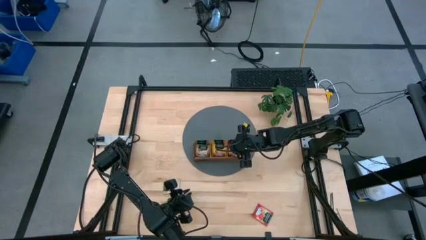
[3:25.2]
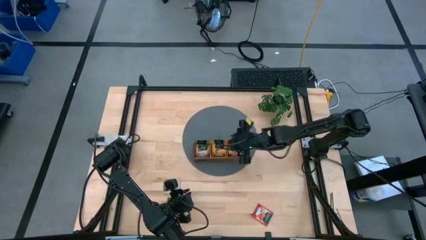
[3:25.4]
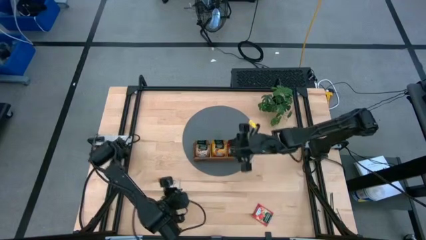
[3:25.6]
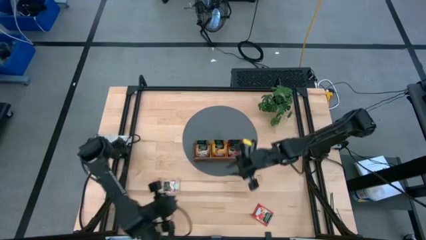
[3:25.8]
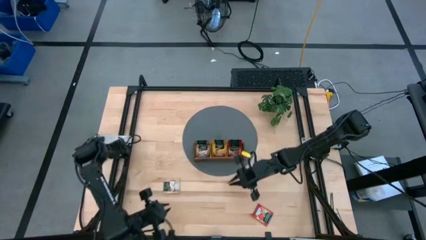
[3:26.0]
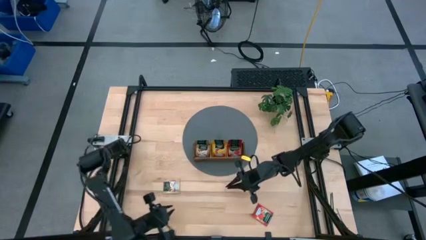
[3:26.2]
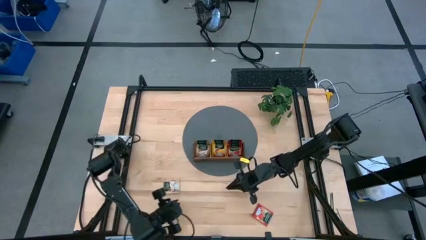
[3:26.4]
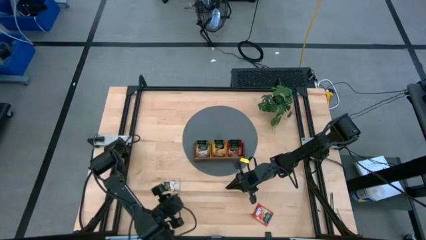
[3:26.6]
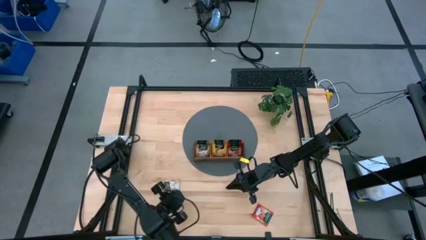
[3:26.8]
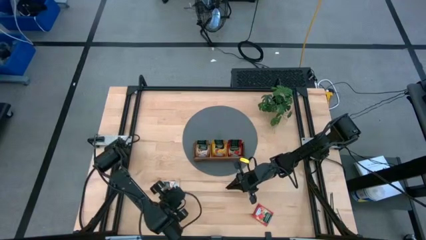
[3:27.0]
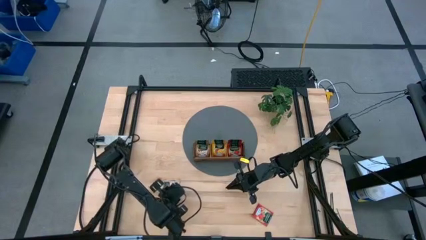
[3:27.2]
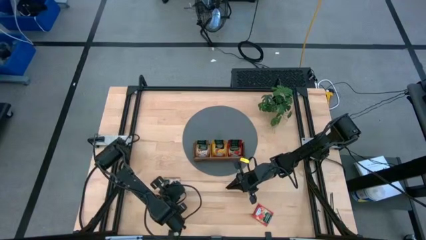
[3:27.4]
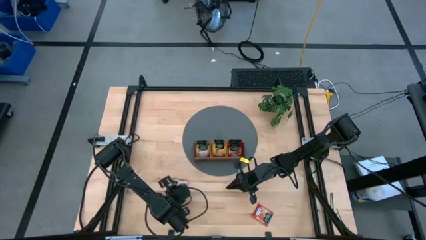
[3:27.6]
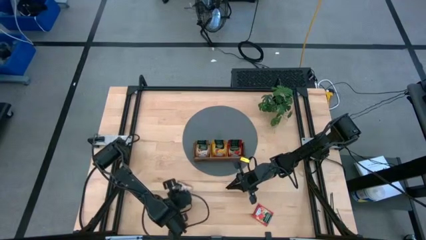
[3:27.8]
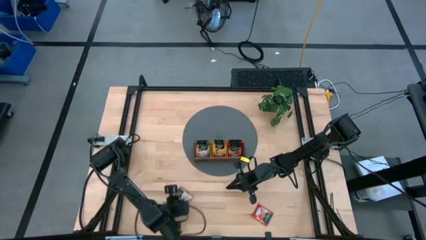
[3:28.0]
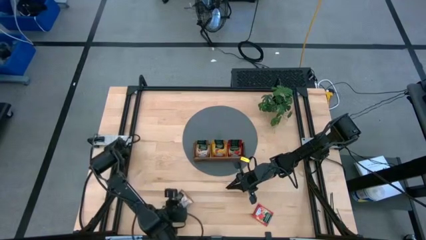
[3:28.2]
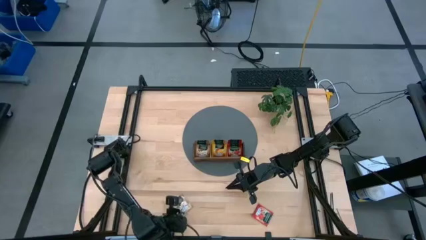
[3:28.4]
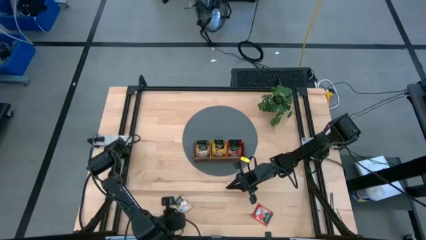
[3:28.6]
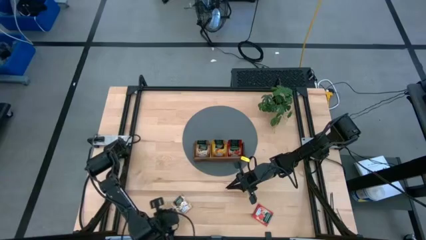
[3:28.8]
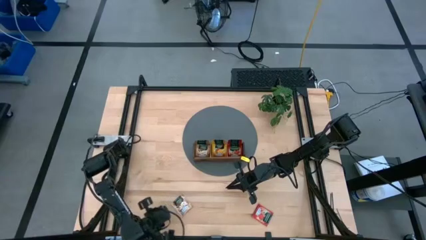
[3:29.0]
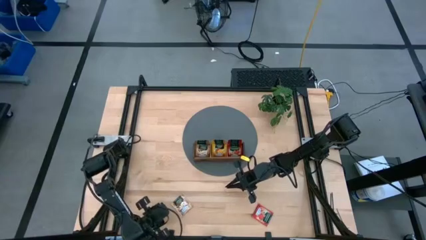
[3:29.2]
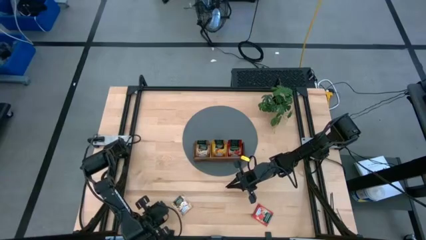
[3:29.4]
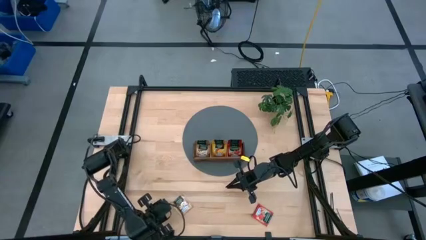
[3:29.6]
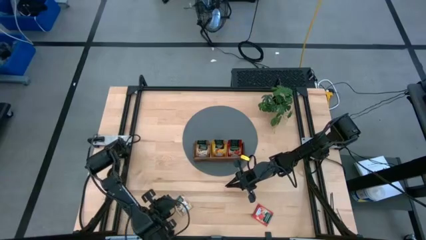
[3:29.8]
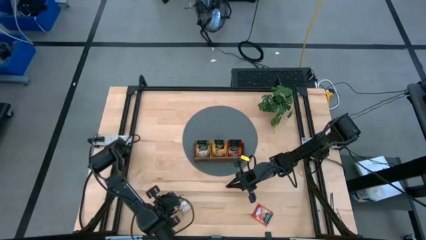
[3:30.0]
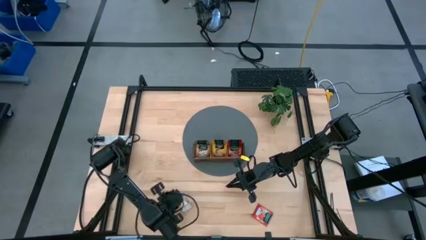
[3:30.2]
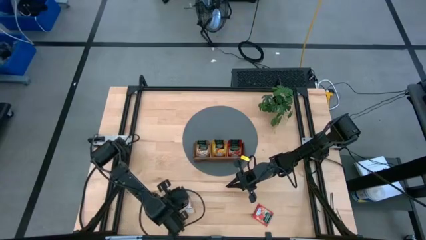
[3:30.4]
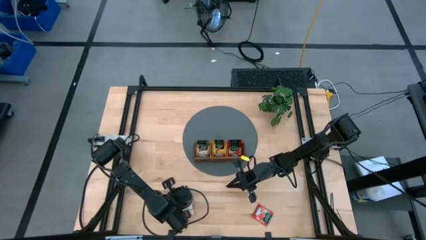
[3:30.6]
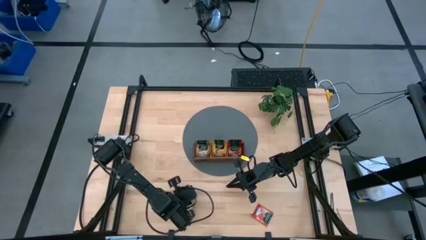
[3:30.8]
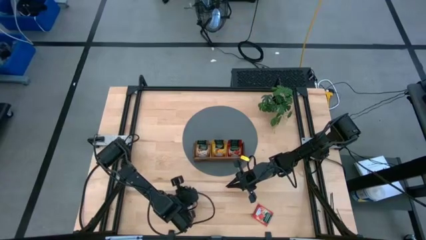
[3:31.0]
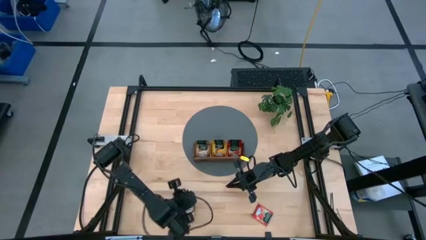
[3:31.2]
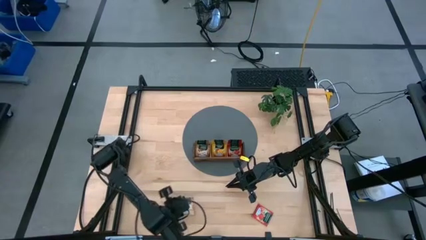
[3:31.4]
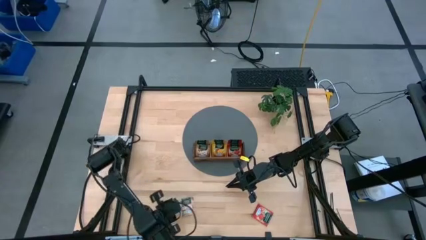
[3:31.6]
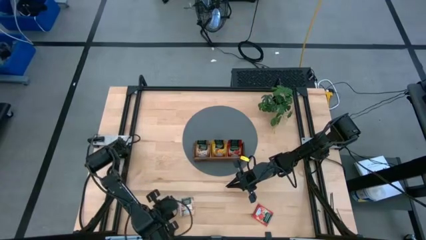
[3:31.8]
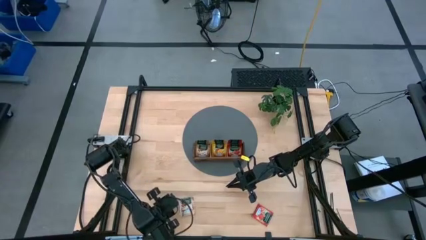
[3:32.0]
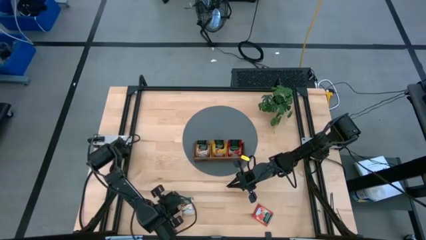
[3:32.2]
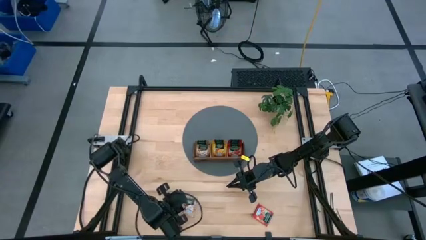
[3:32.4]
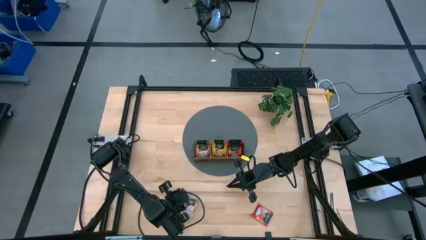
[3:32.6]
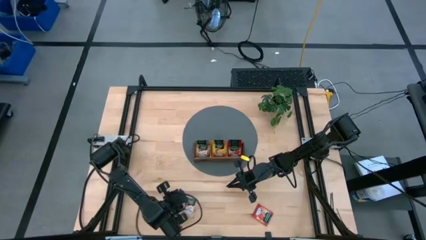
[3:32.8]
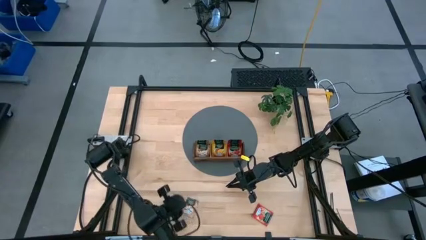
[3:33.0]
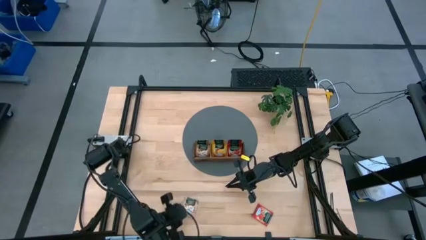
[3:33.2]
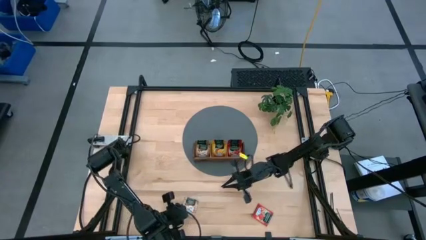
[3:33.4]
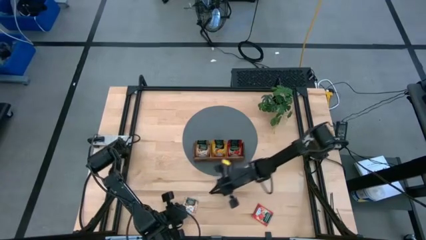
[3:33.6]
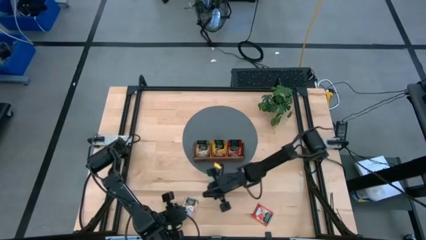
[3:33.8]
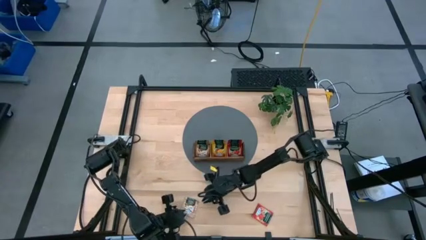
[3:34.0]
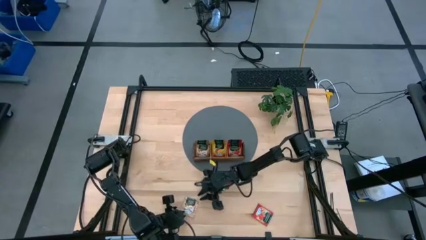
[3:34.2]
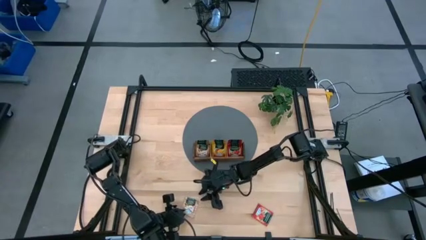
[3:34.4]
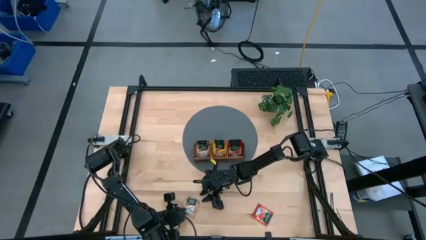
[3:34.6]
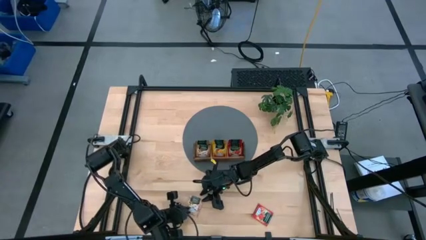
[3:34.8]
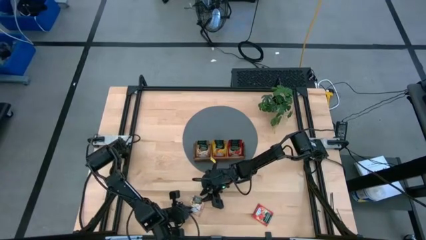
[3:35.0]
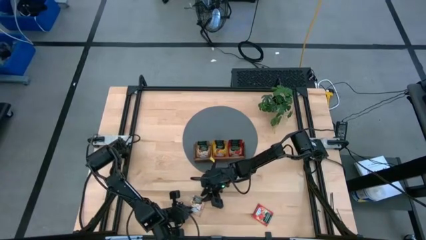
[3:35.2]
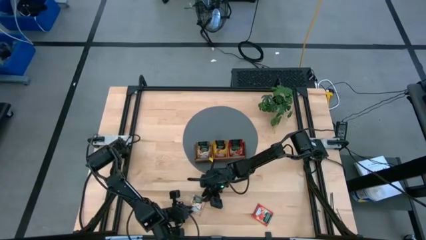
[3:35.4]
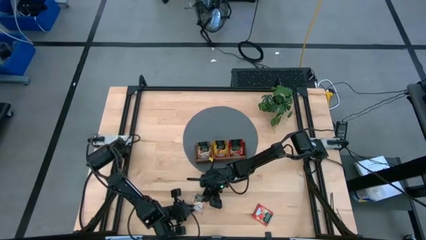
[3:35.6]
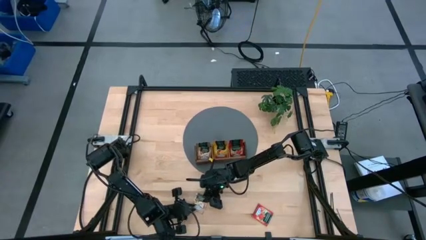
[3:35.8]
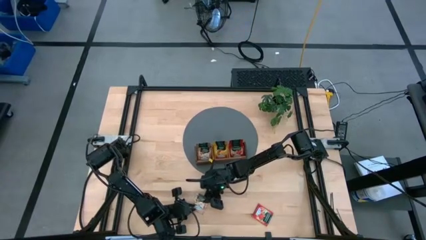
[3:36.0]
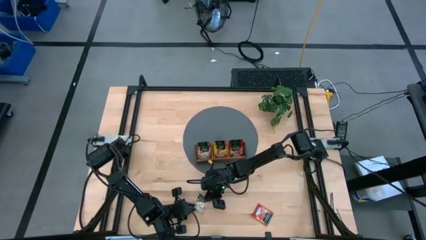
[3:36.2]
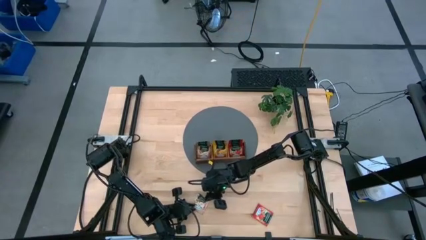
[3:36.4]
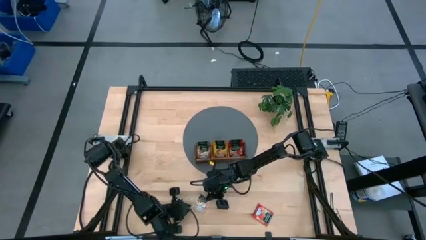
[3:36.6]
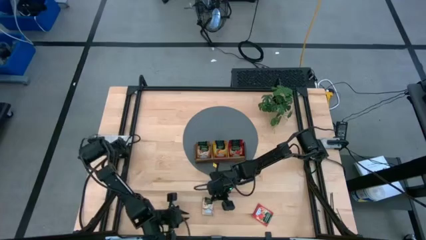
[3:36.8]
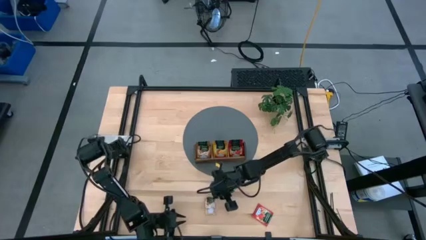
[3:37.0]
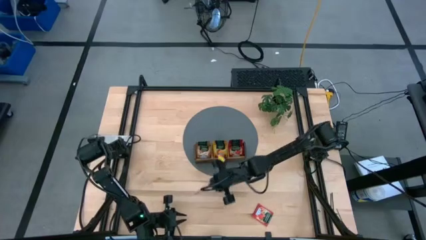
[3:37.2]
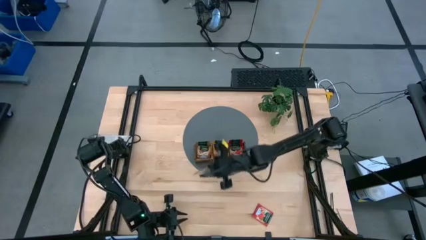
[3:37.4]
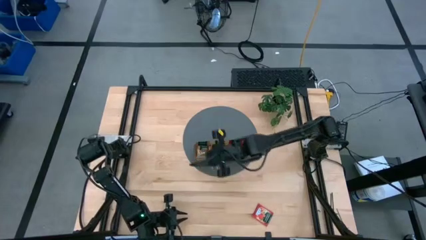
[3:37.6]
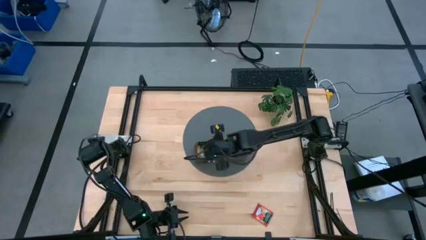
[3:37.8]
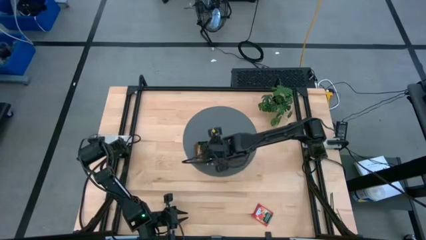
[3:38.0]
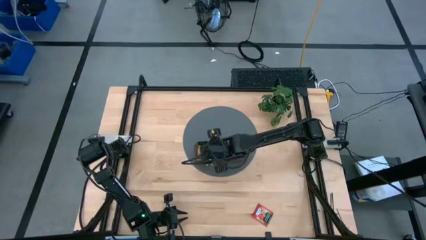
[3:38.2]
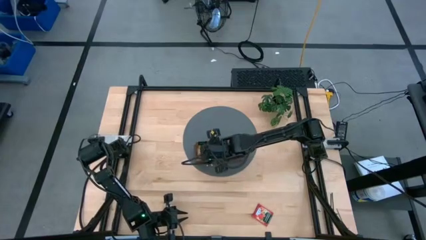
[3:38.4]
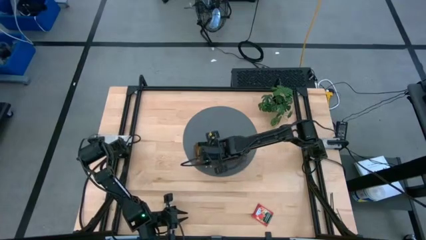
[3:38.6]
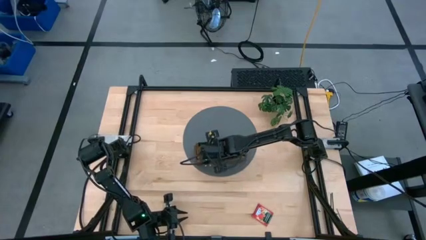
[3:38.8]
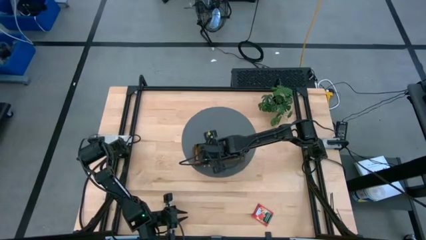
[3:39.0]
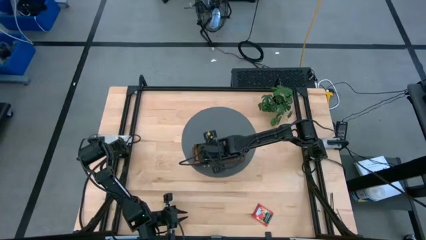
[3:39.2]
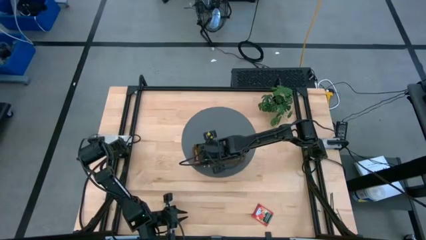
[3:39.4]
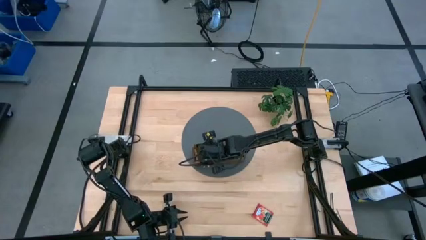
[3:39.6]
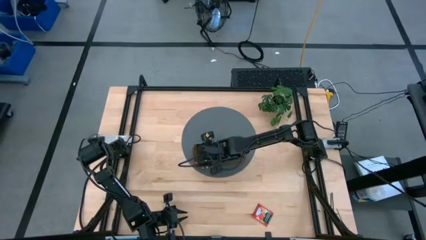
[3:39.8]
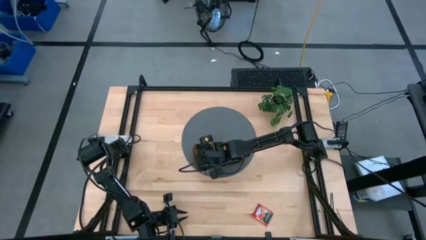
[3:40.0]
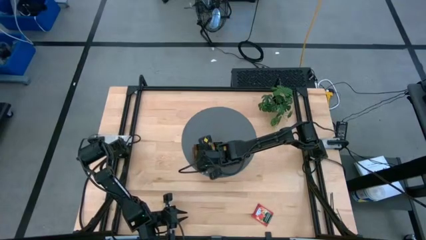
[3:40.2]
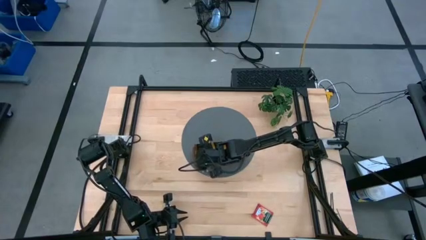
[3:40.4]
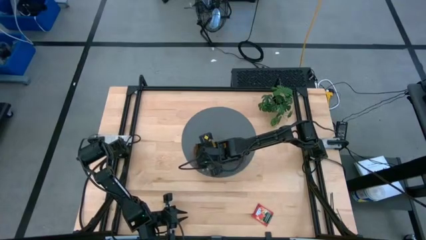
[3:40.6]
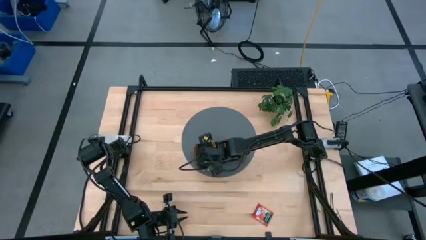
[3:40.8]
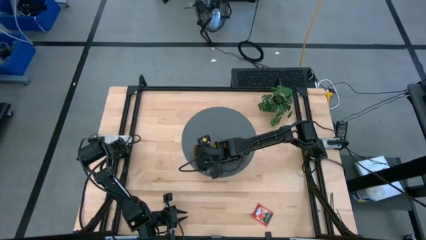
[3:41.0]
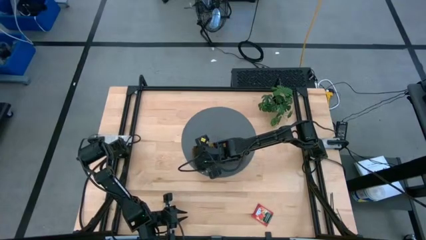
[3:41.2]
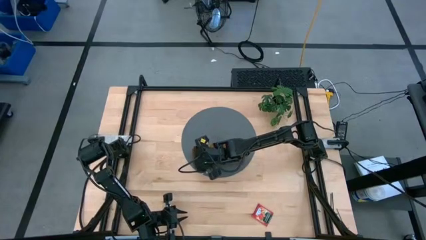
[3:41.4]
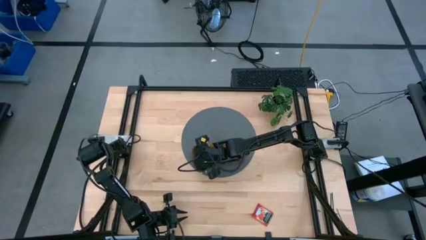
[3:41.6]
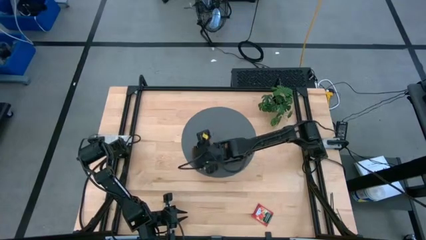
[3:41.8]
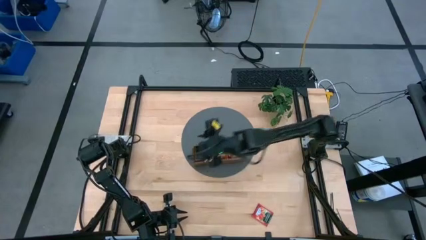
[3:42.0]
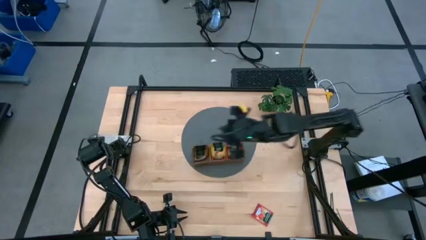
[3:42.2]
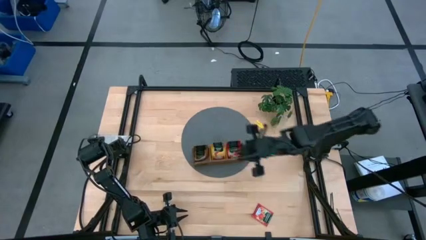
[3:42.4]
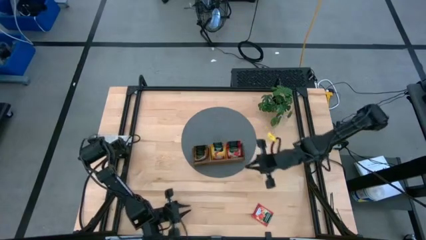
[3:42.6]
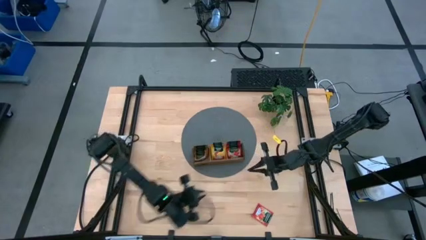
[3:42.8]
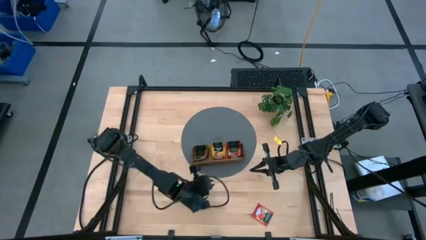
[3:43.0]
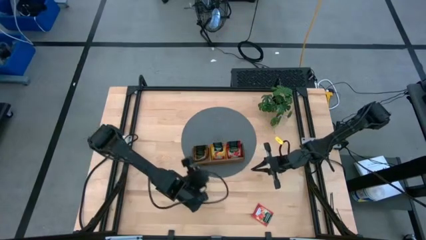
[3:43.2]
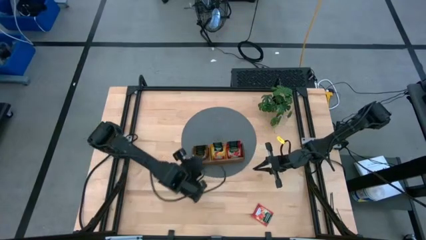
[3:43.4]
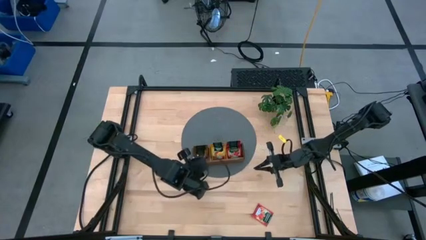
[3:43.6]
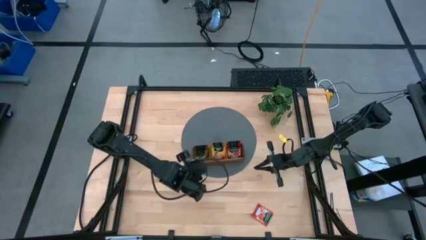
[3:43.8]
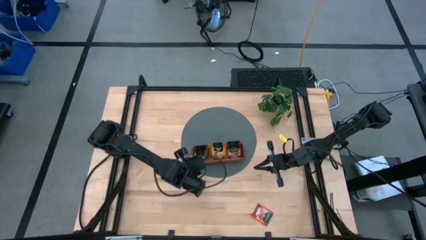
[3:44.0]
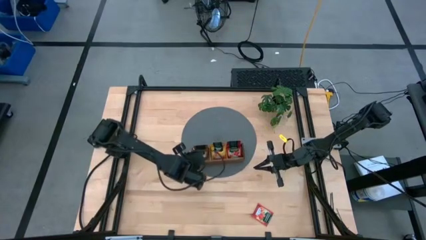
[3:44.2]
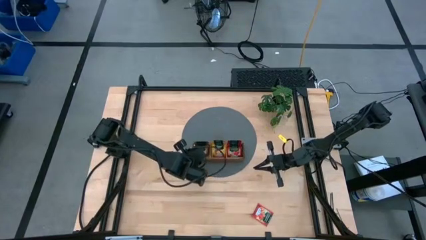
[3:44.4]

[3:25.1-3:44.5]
Task: Pick & Place Tea
Put the brown tea bag into the left section of the wooden organizer
